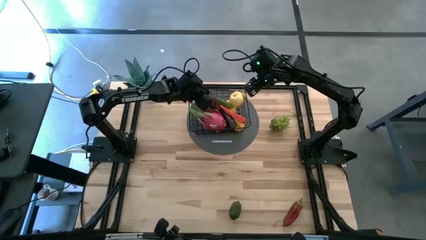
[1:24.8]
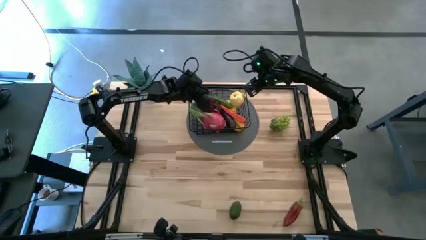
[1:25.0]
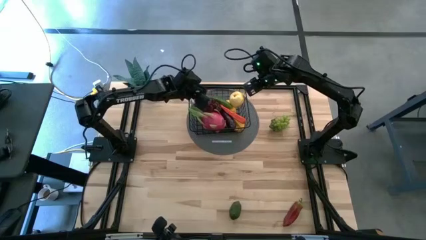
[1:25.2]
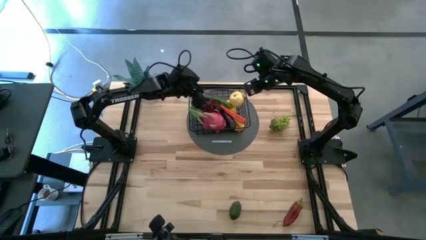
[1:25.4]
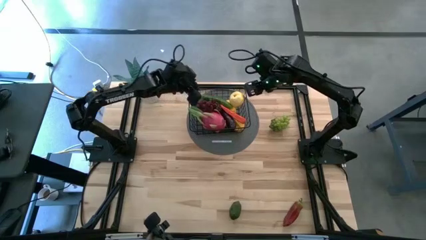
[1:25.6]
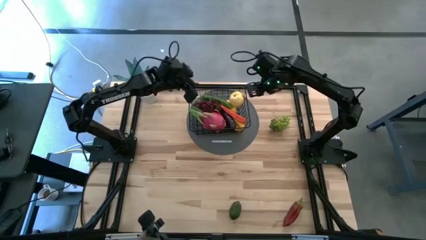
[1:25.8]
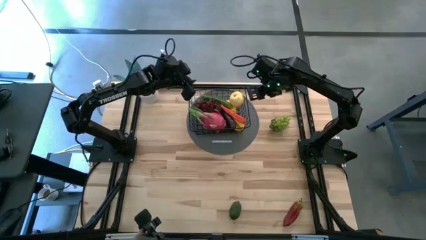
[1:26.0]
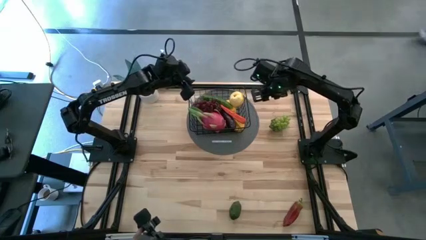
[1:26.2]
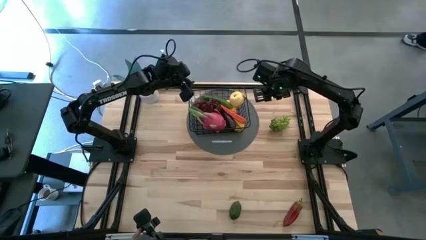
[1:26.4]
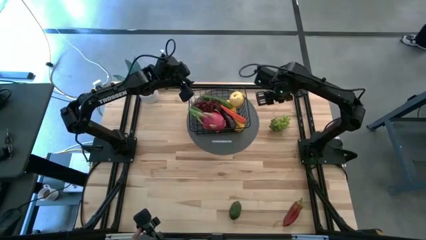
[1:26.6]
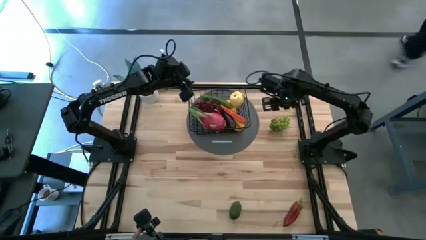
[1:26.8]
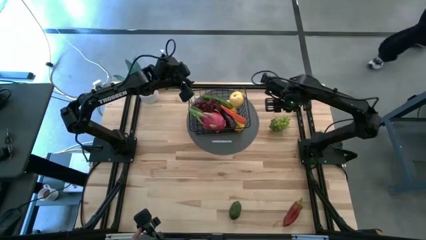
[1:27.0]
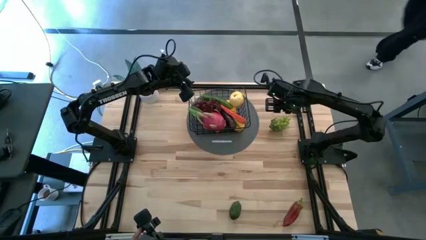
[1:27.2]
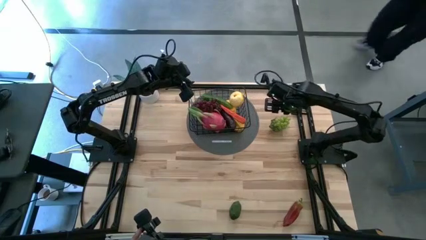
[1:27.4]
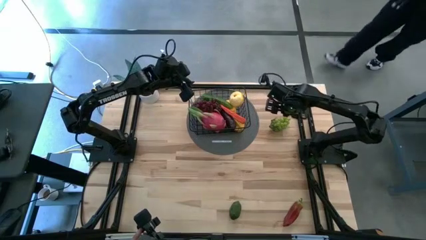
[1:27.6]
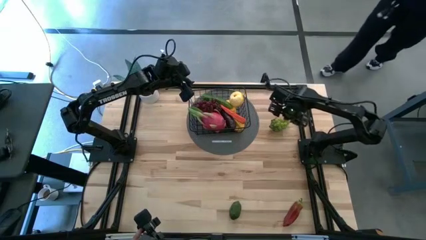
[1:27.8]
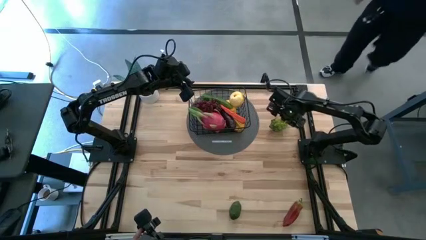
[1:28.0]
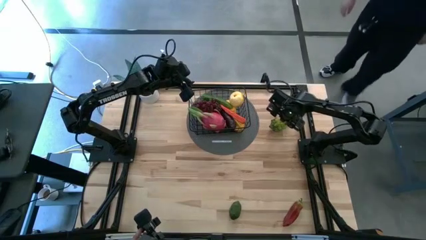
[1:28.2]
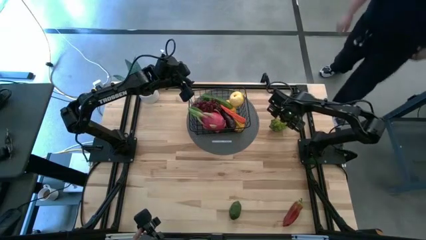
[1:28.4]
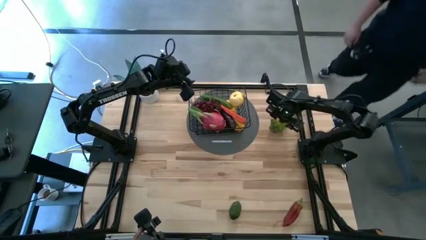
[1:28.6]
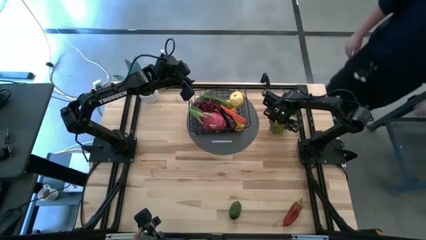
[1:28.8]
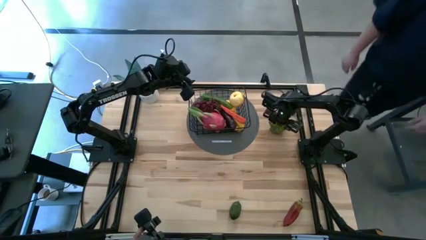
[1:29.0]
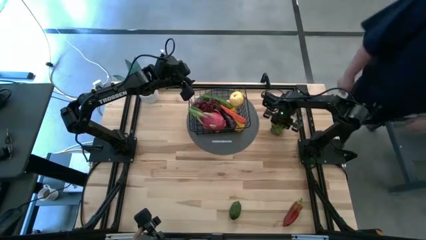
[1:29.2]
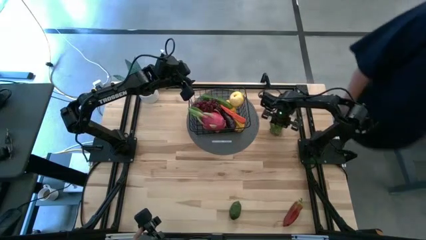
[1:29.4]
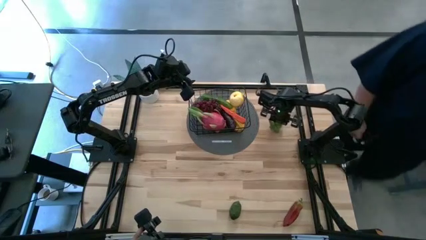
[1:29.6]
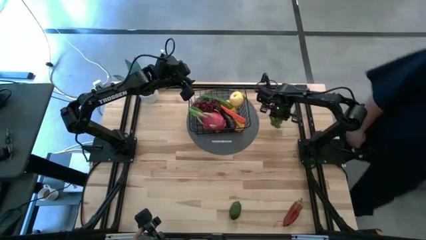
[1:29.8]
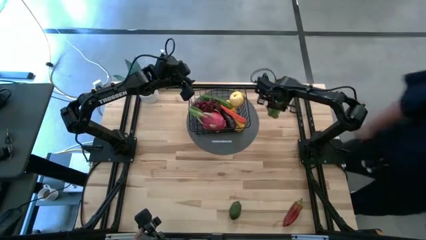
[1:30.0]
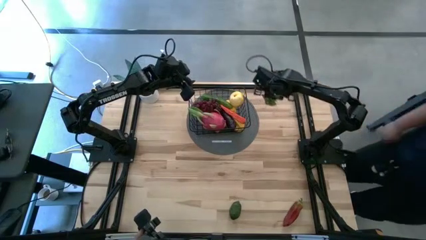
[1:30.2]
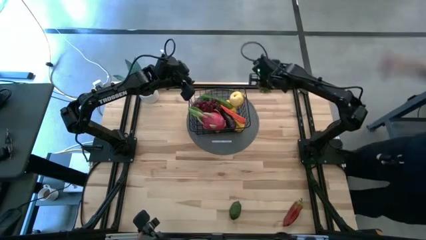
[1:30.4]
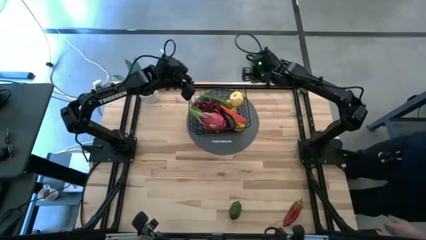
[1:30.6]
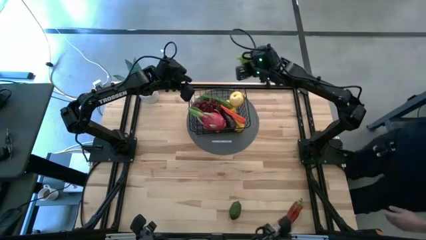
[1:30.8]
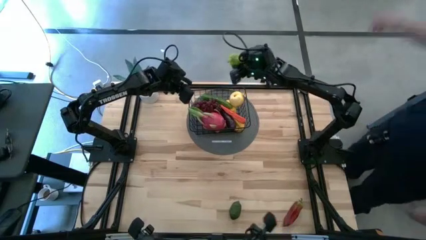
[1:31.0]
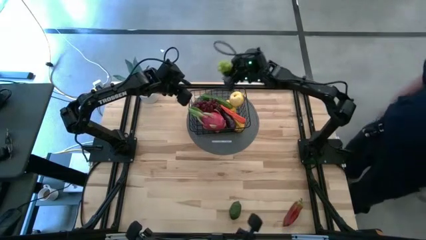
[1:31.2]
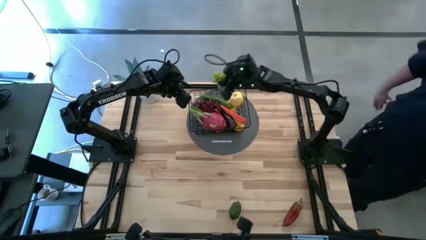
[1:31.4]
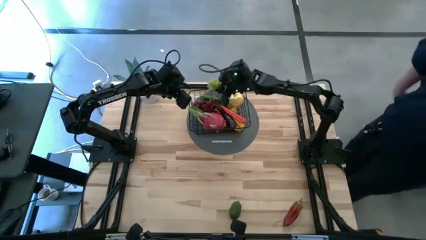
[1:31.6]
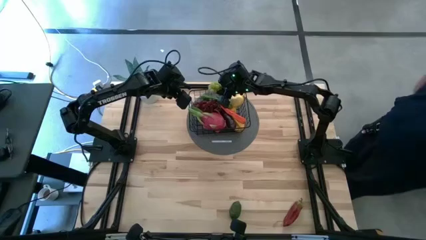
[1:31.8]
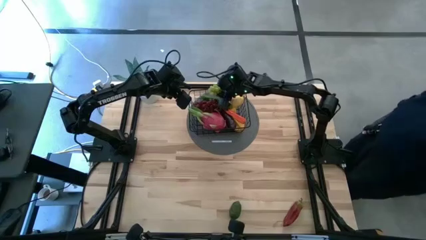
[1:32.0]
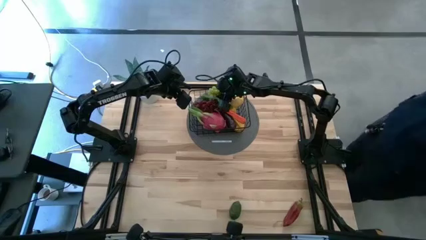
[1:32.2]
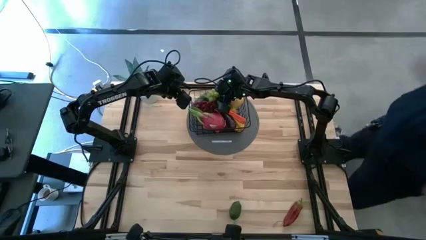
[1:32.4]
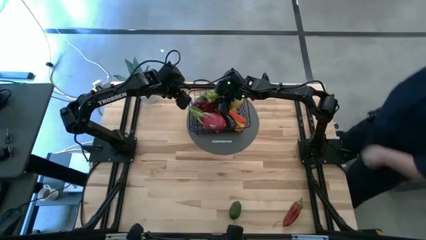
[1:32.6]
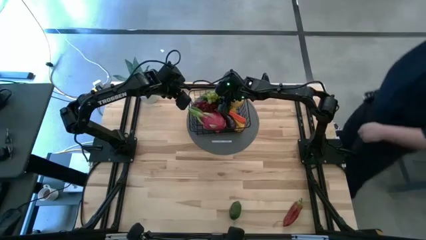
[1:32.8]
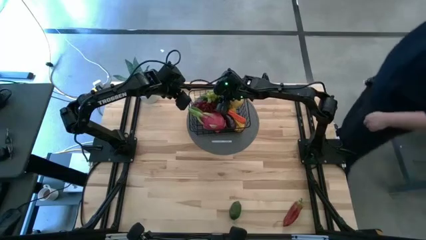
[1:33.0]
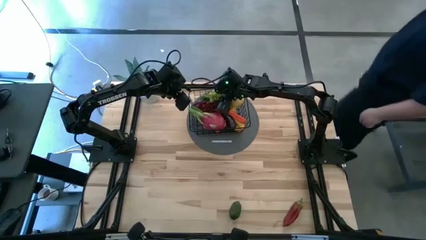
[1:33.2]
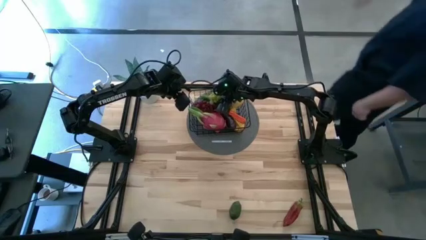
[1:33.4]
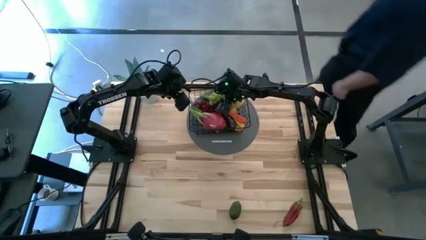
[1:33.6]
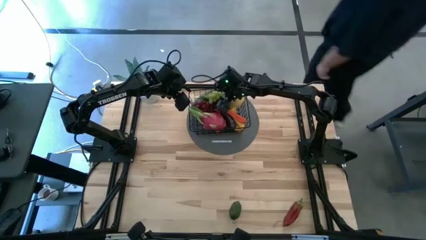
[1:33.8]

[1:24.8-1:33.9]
Task: Build produce basket
Put the green grapes into the wire basket

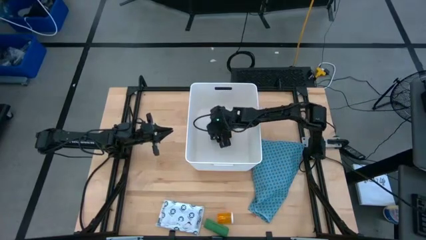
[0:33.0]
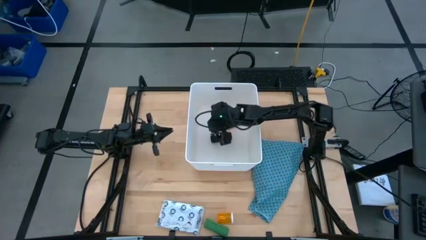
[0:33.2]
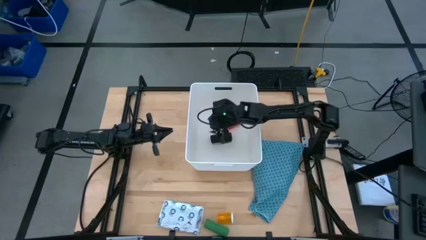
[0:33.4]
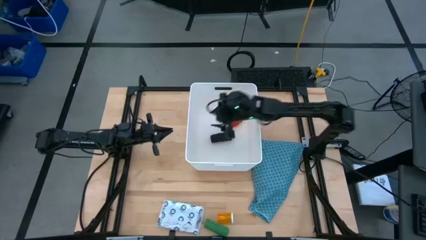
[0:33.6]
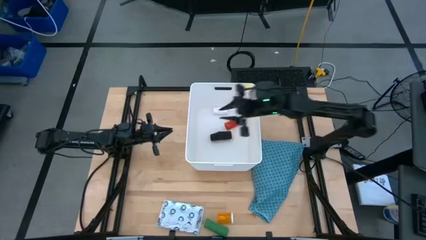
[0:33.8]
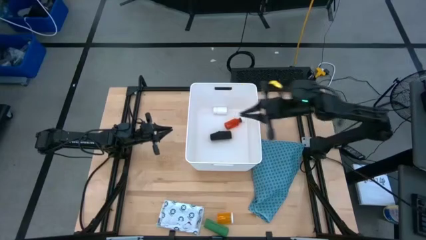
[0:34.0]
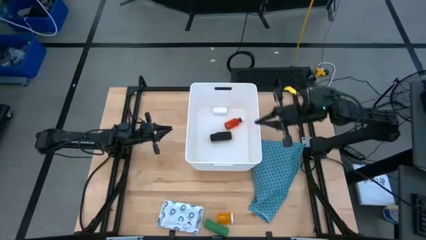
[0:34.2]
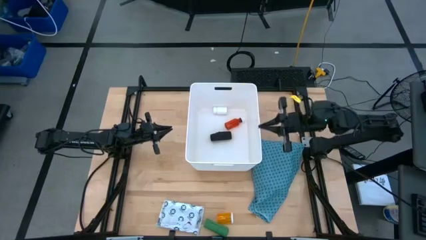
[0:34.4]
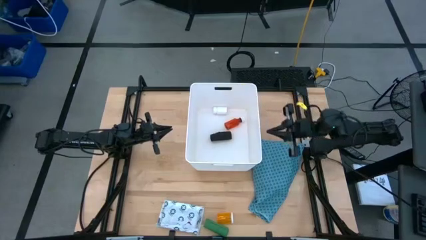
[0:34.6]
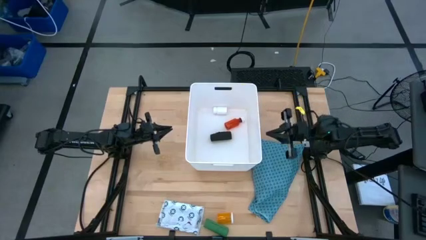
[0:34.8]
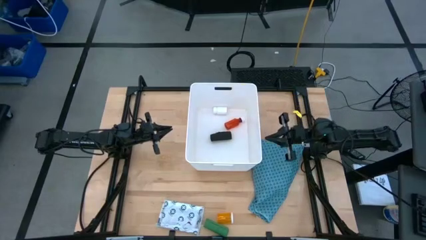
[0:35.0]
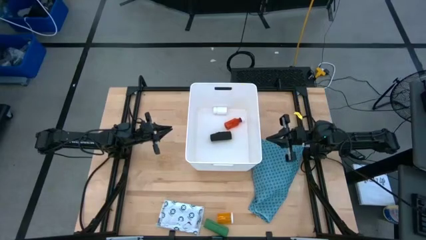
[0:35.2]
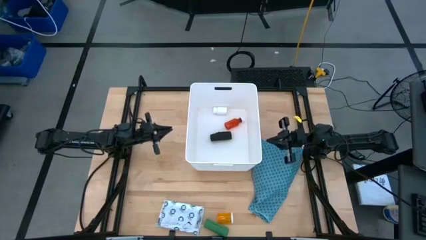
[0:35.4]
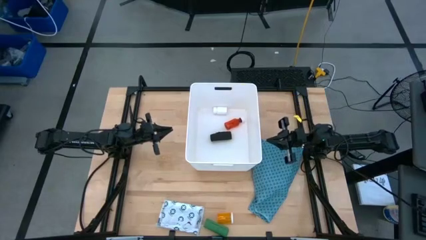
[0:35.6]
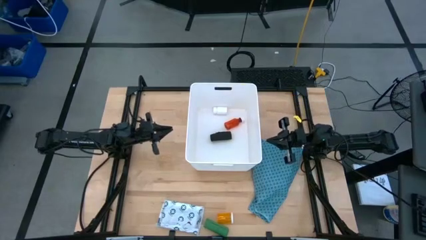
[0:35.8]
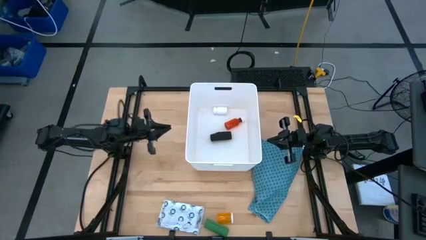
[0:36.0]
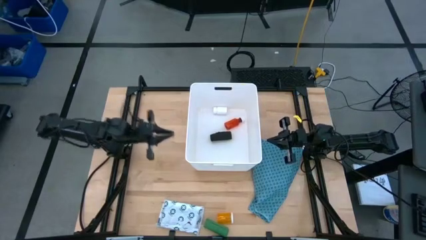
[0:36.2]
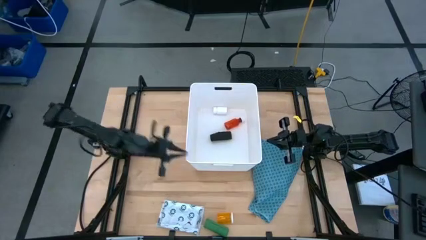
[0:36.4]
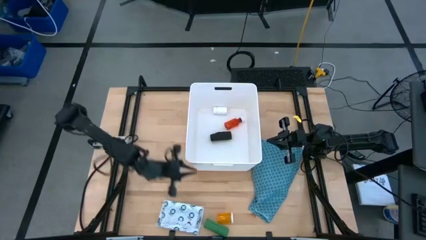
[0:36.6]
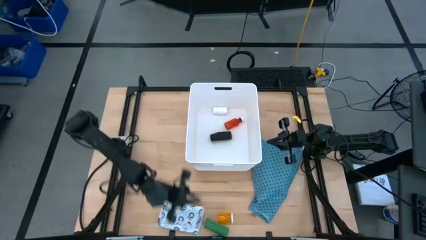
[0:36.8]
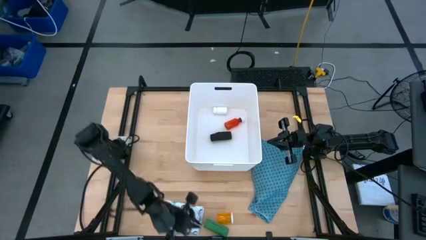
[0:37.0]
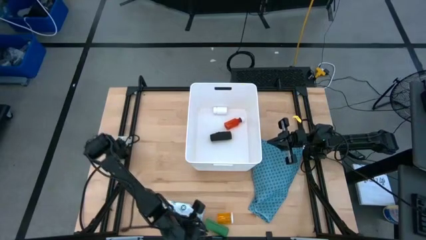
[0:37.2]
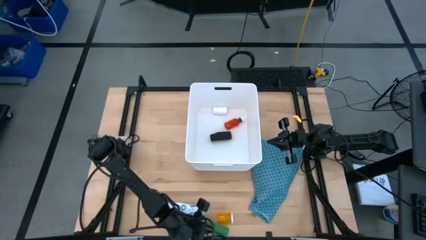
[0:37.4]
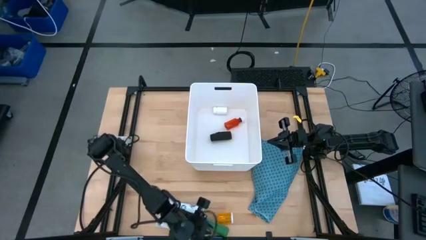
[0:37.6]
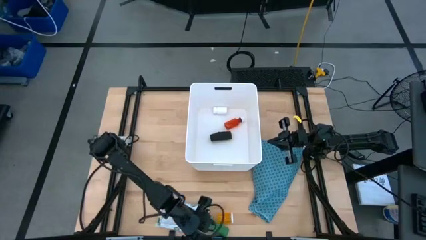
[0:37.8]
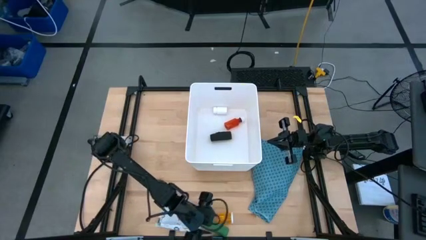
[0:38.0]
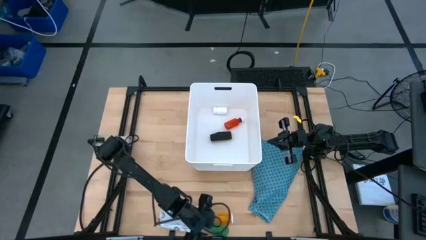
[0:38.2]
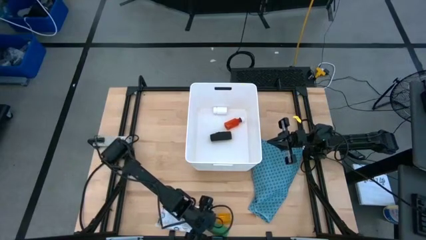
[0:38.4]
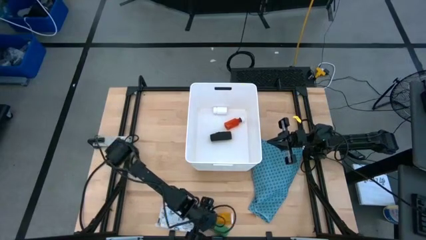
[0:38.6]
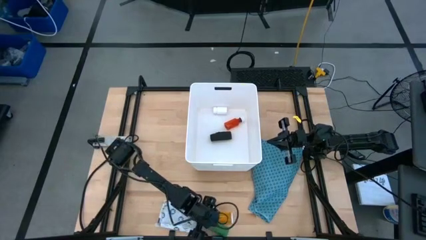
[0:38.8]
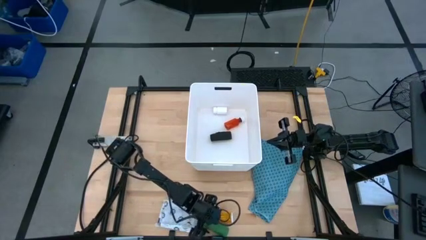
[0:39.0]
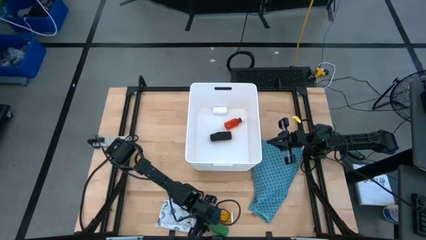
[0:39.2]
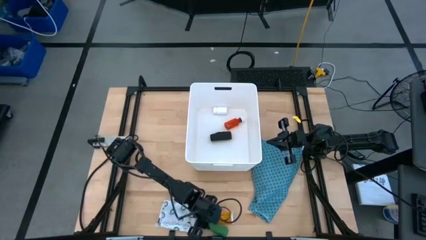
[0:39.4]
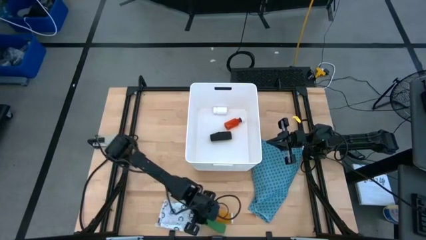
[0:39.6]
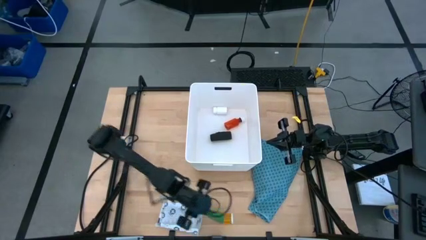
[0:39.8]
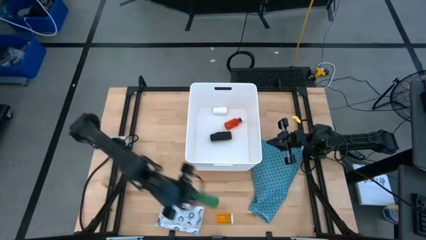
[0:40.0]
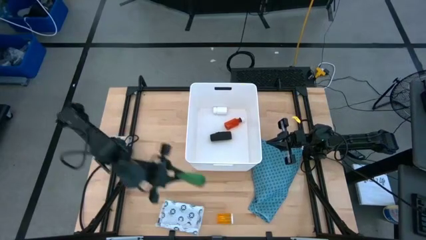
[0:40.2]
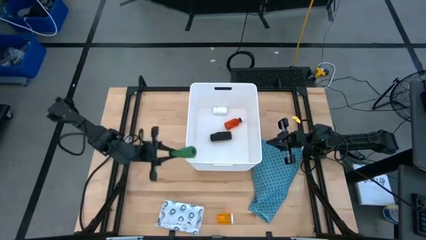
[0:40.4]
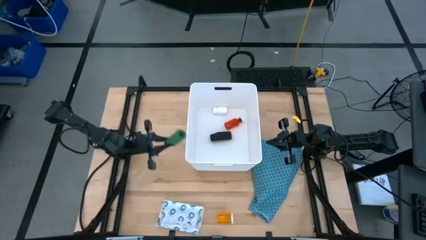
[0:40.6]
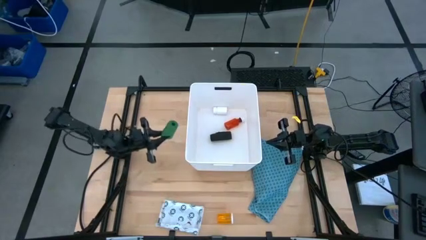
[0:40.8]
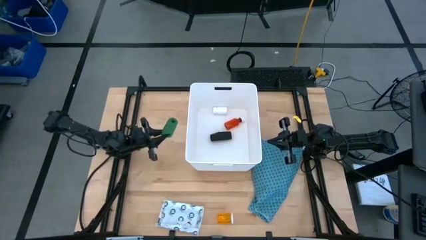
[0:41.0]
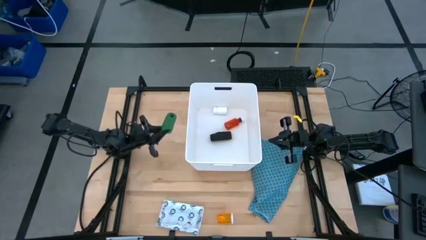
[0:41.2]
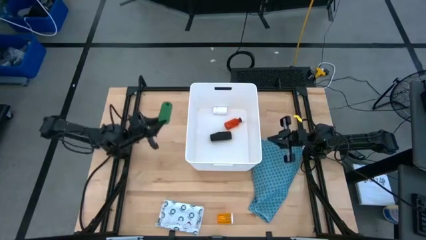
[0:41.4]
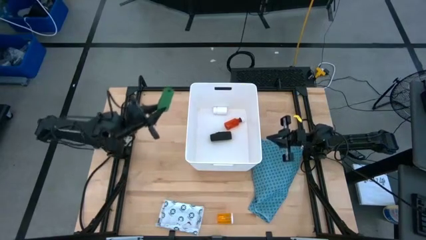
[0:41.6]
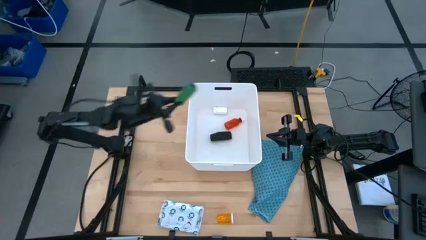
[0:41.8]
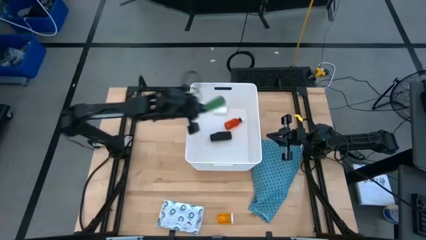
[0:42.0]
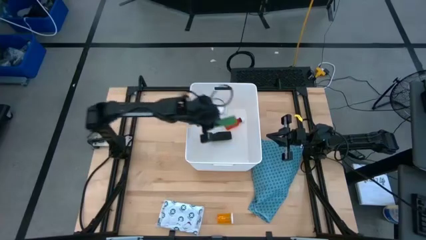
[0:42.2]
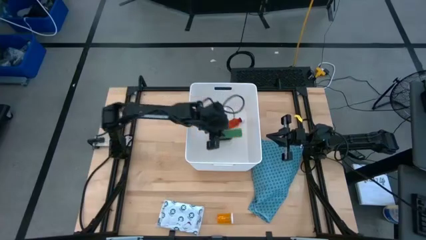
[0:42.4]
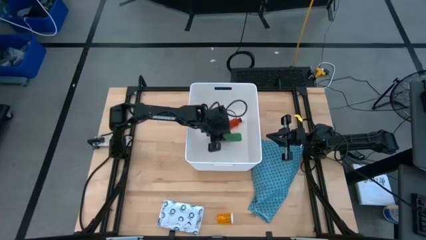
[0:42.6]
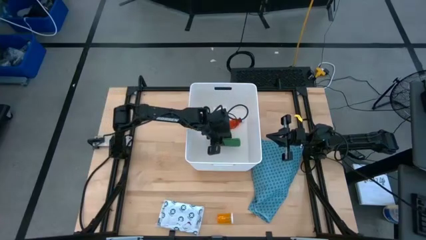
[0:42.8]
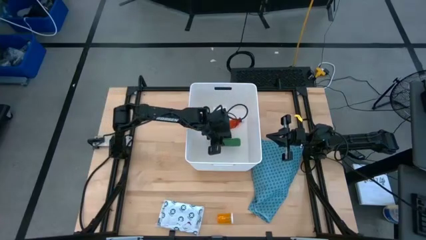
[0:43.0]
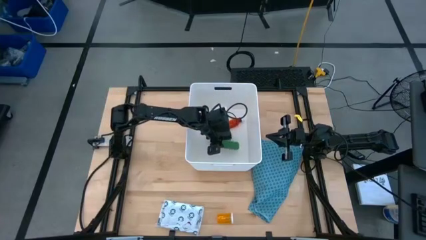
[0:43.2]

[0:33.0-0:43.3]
Task: Pick & place medical supplies in basket/bin
Put the green bandage into the white bin
